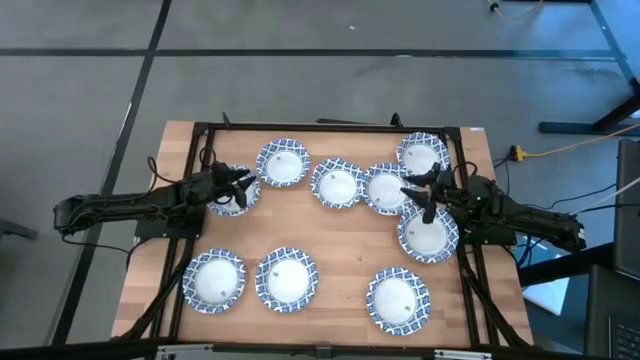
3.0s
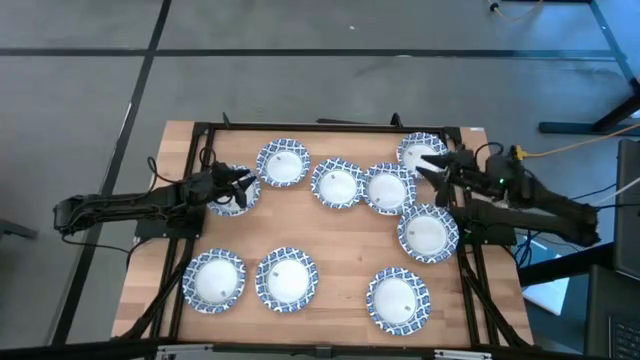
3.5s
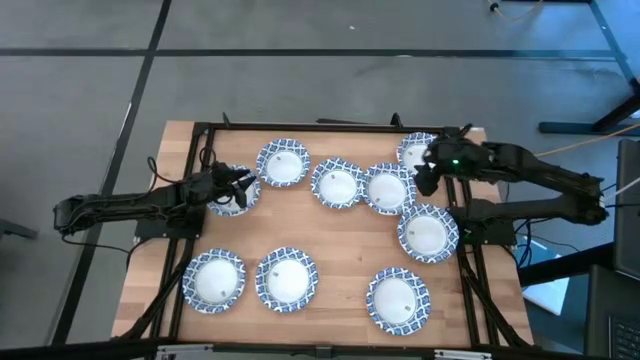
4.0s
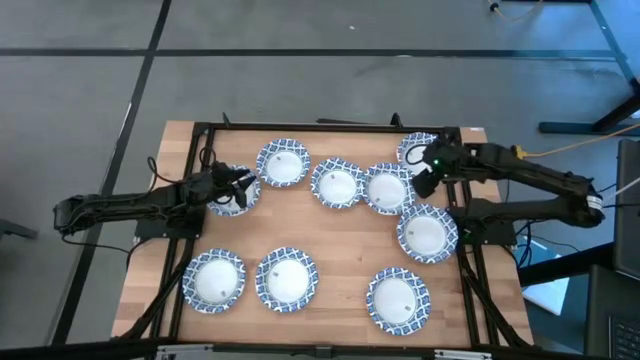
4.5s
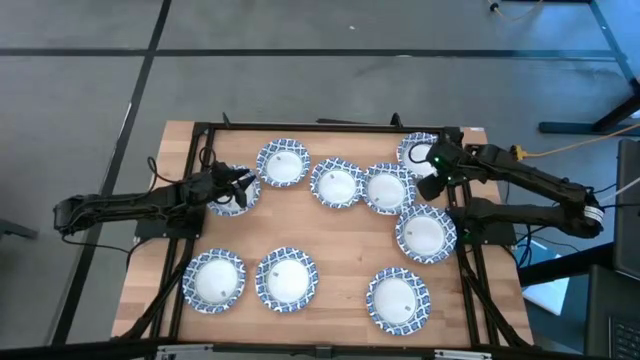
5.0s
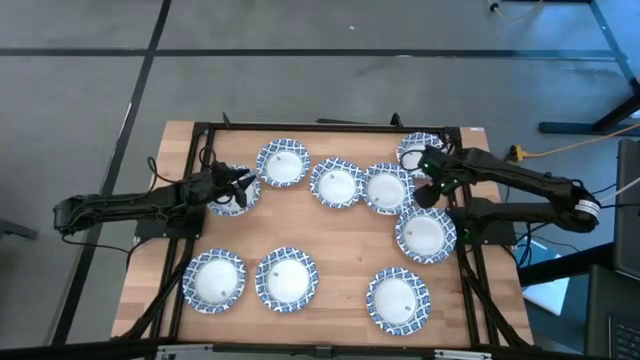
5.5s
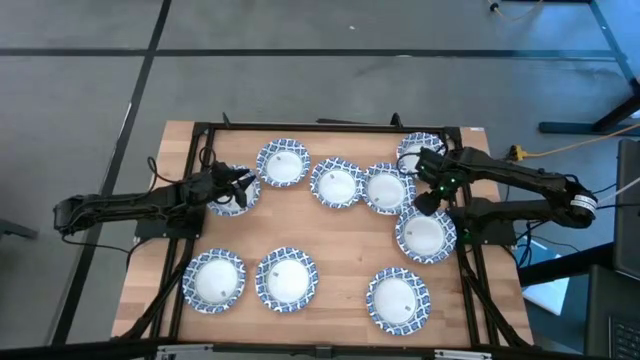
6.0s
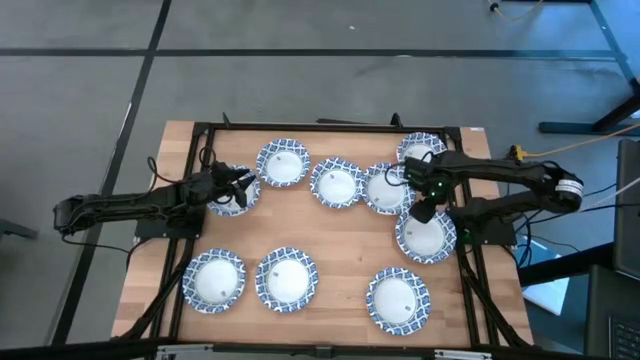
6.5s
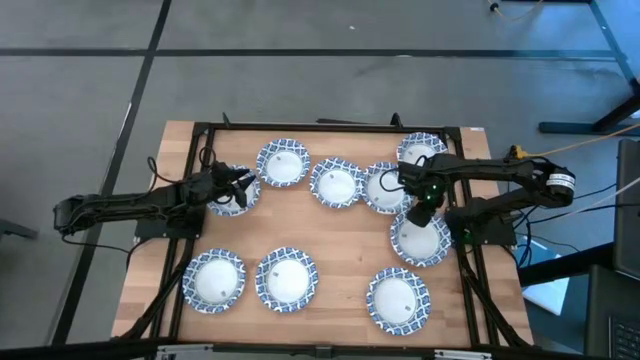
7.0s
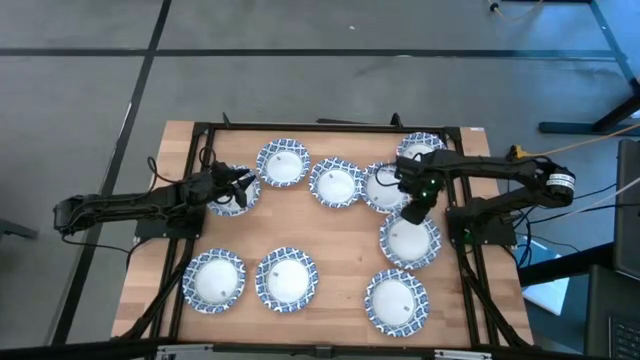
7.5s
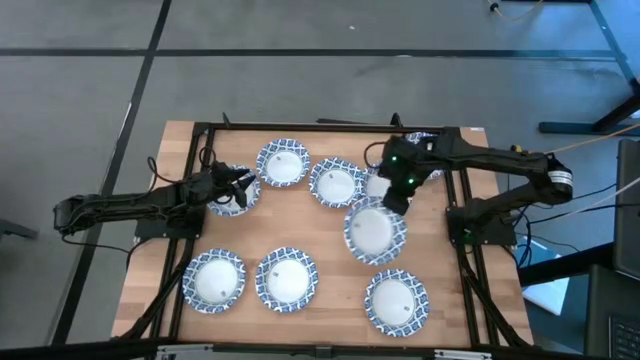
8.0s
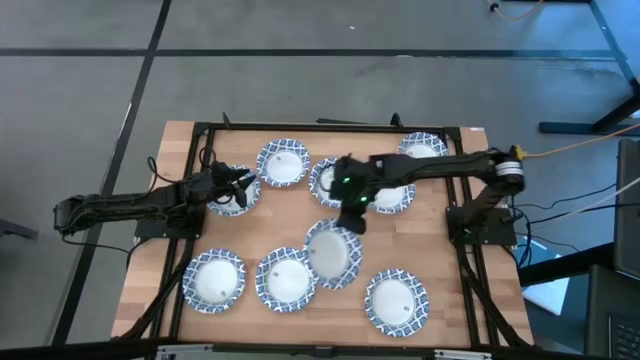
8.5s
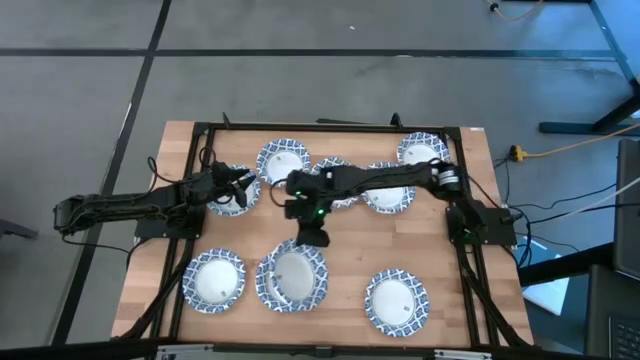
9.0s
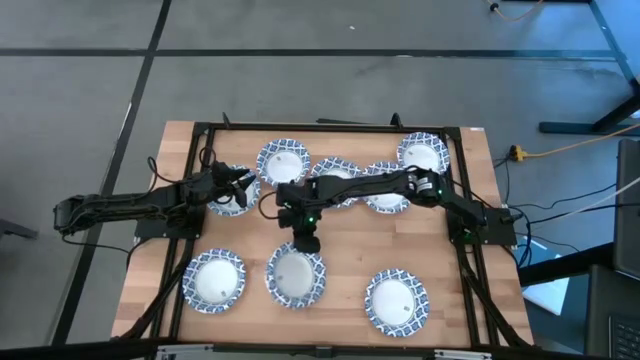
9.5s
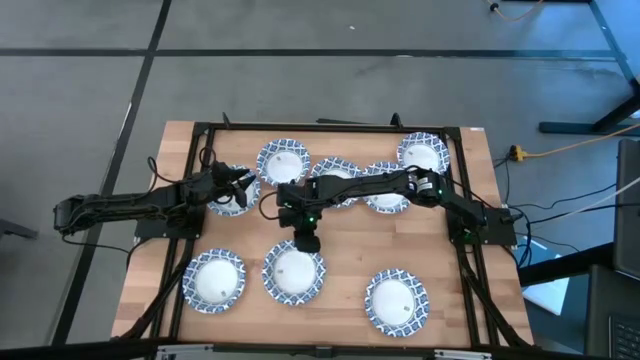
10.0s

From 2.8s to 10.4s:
Task: Nest bowls inside each other
Stack the blue patterned bowl on the blue patterned bowl

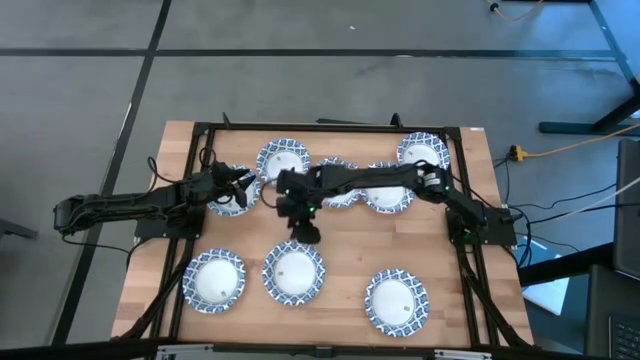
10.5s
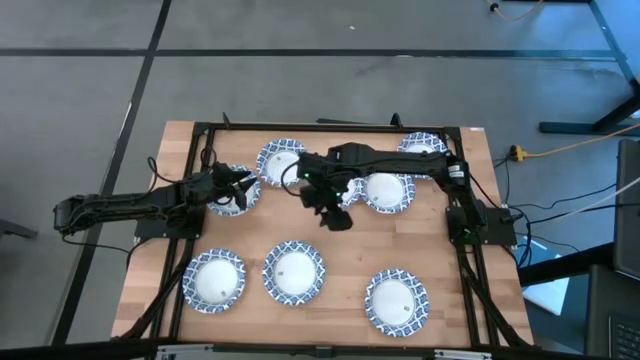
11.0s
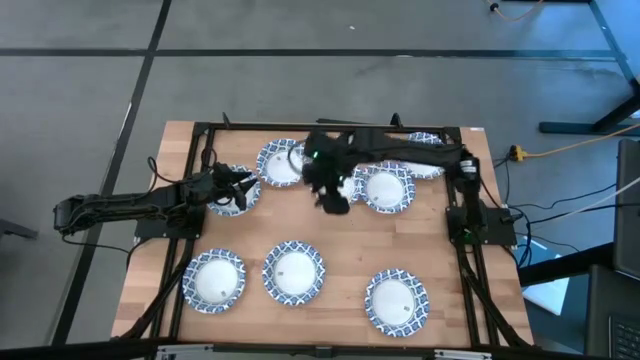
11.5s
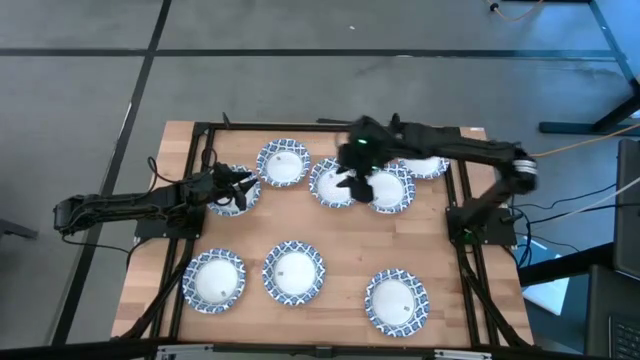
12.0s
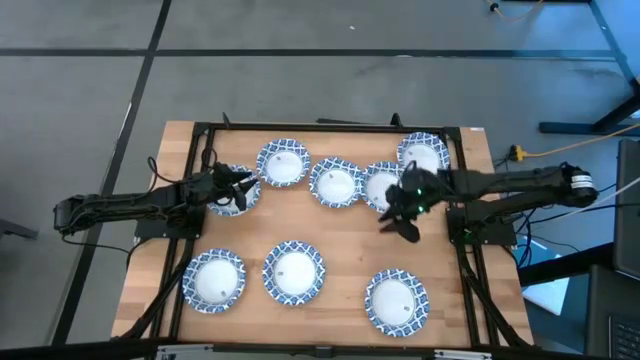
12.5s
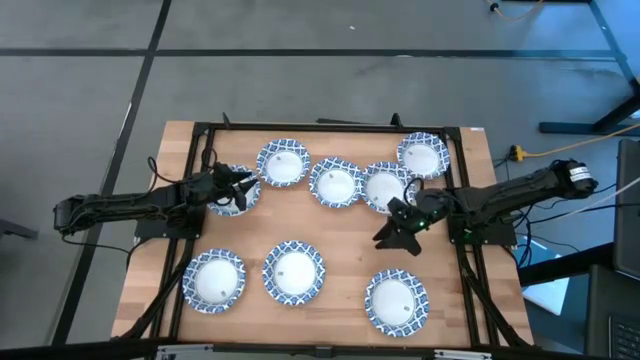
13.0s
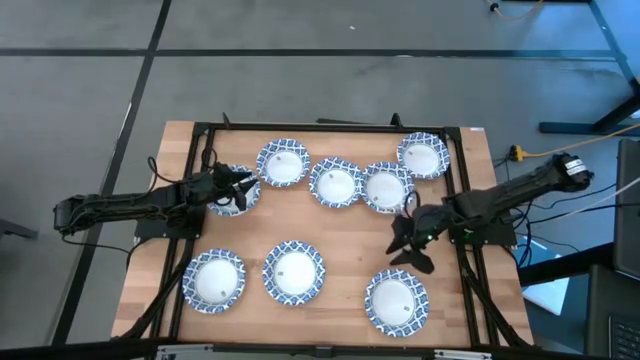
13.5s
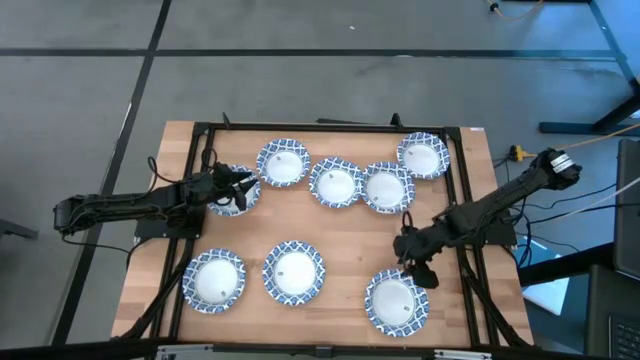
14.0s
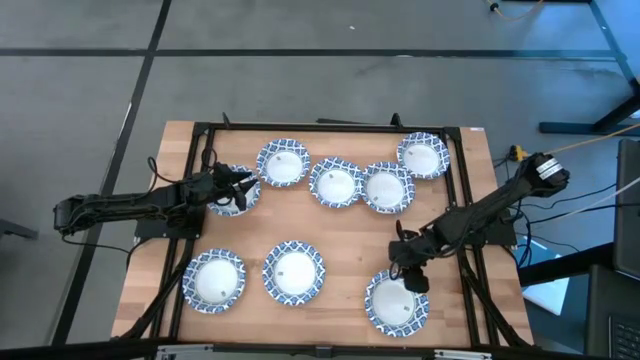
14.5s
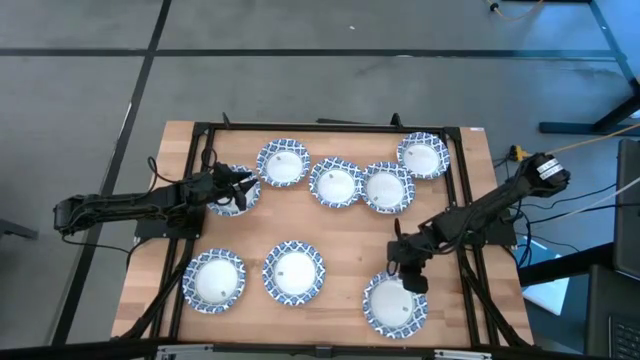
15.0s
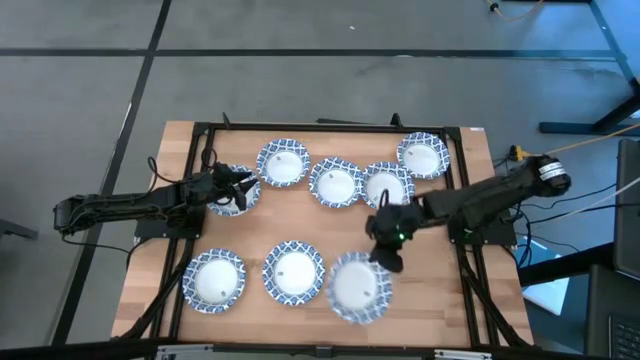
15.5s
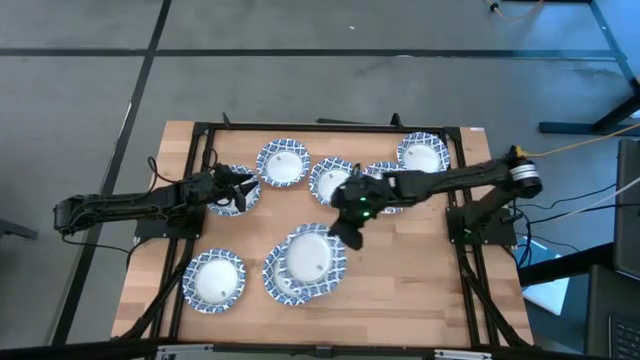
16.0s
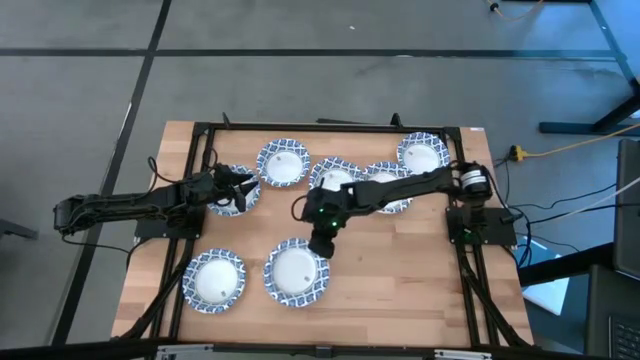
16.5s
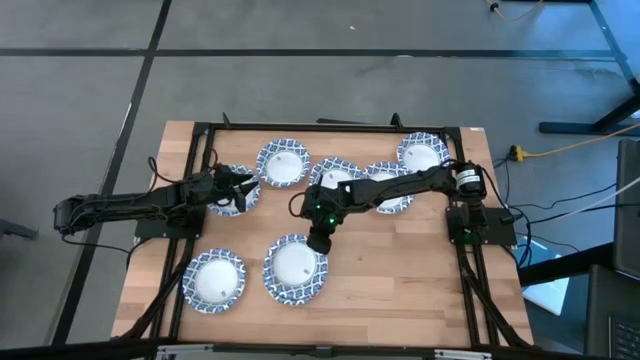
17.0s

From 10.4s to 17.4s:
Stack the blue patterned bowl on the blue patterned bowl

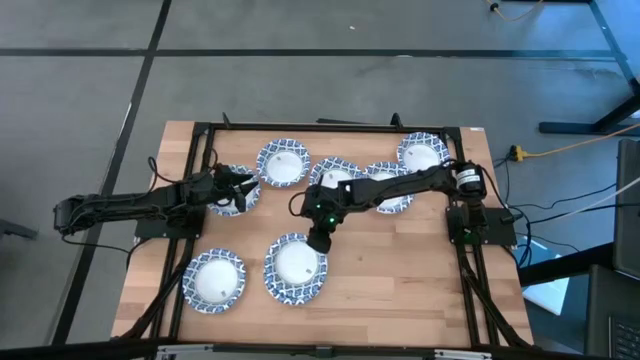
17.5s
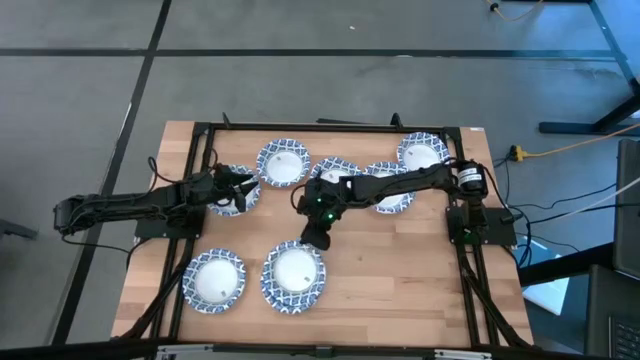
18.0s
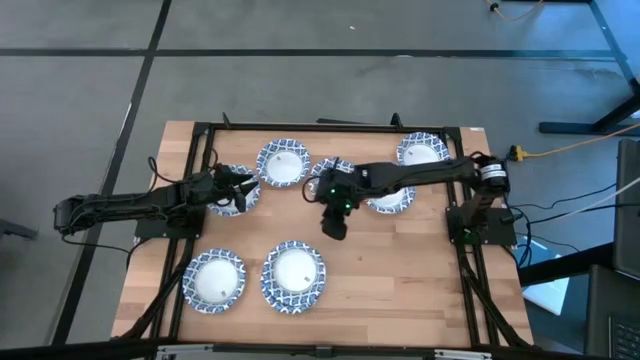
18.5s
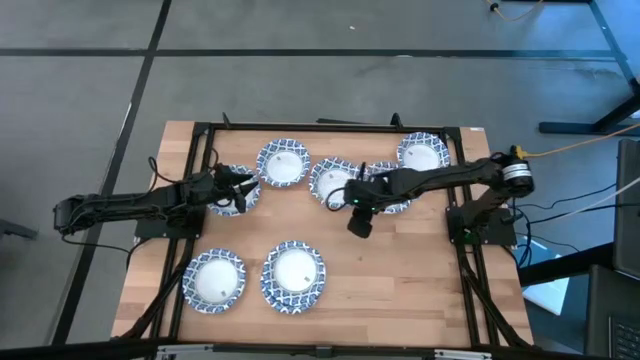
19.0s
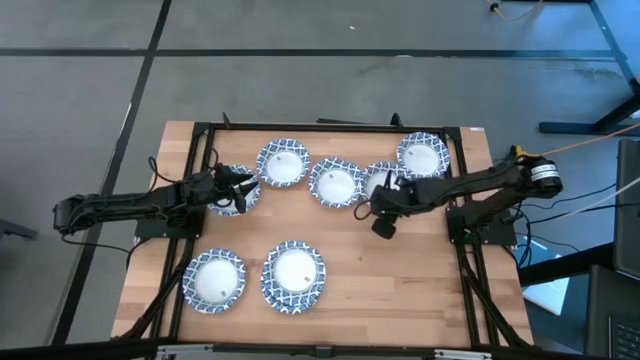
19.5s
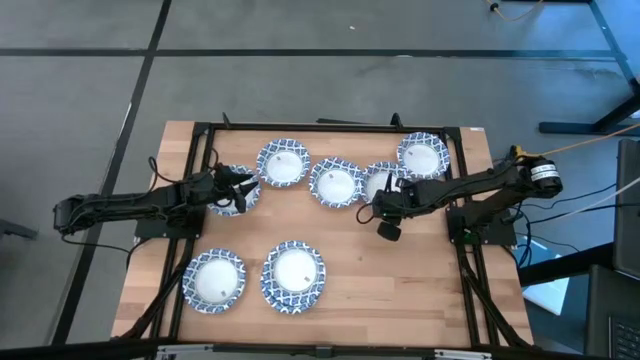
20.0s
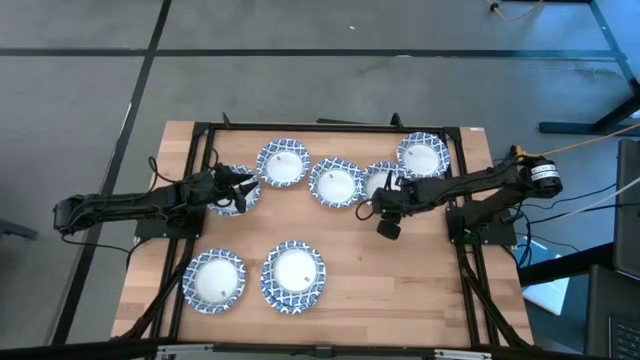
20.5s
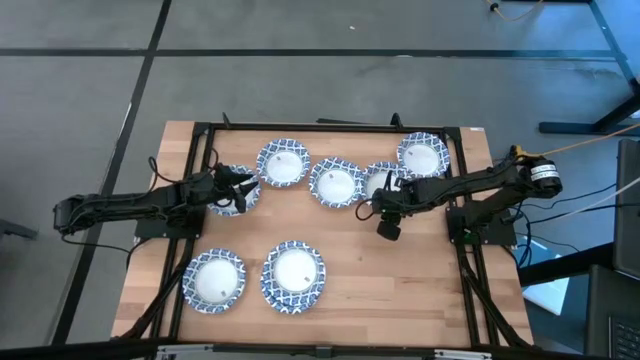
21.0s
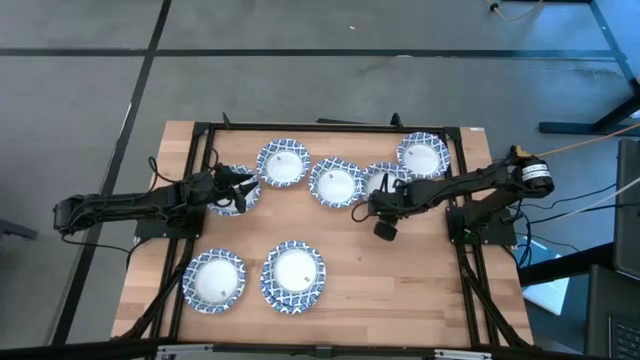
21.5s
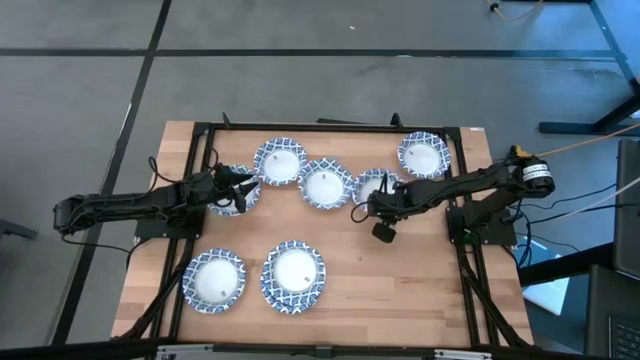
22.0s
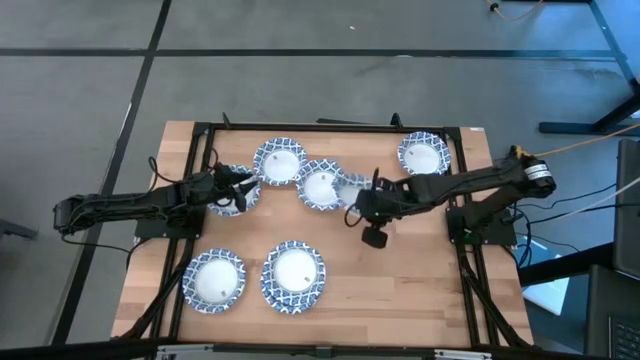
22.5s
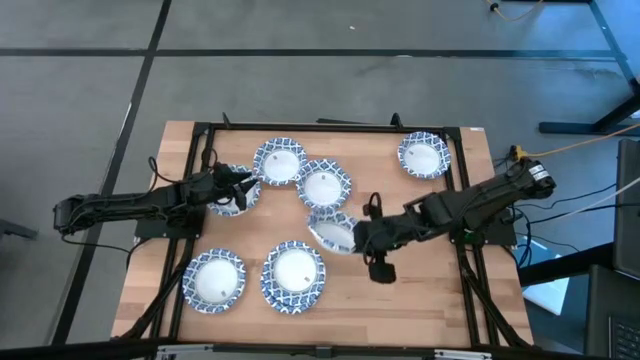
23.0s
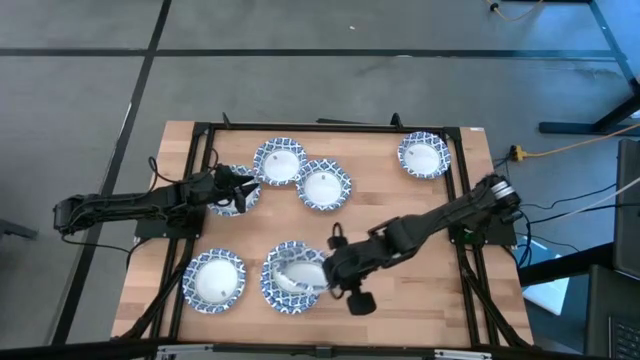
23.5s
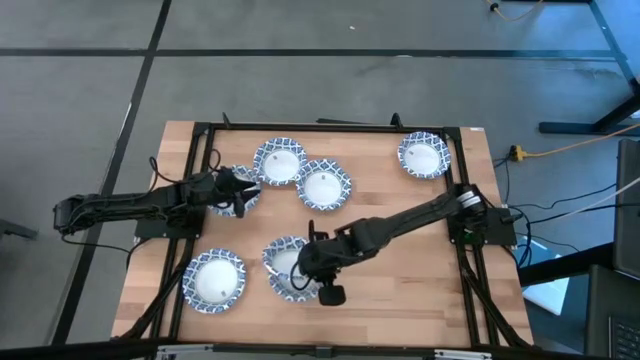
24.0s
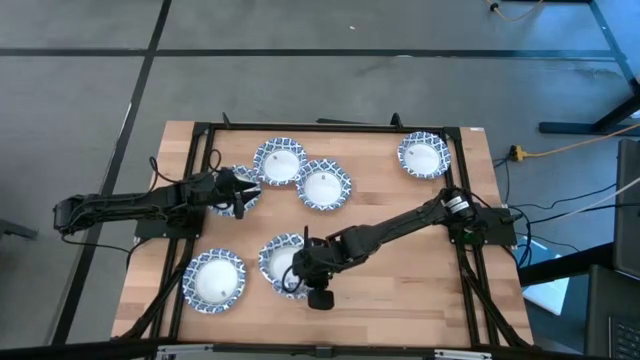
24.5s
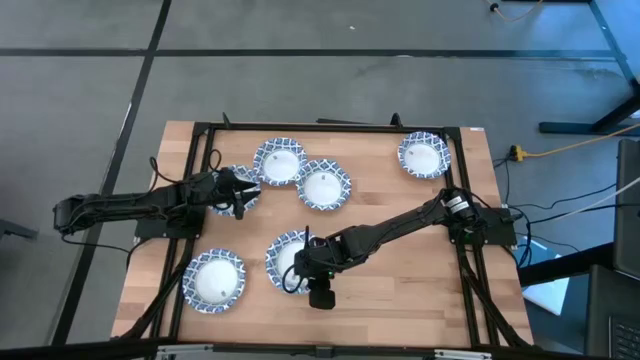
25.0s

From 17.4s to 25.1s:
Stack the blue patterned bowl on the stacked blue patterned bowls
